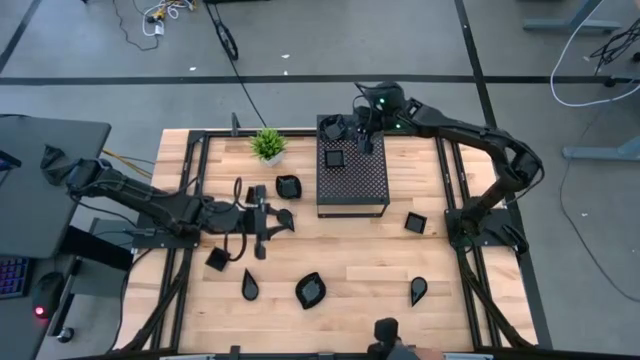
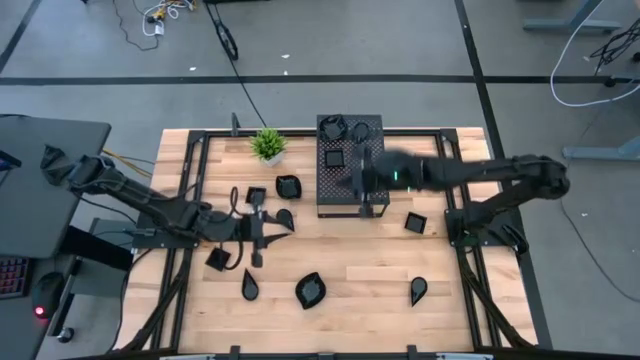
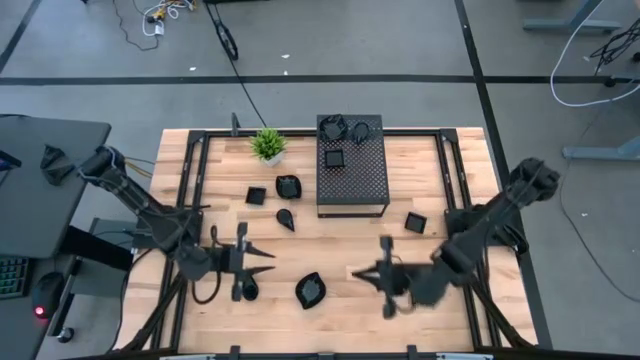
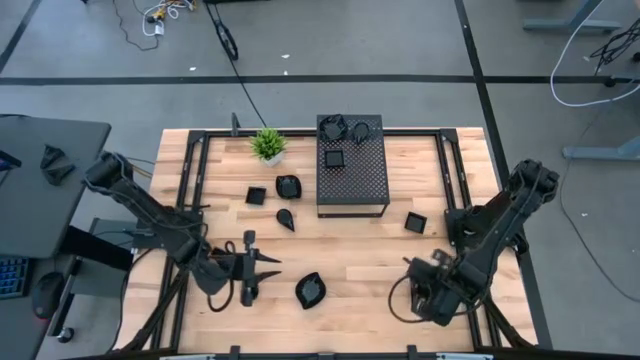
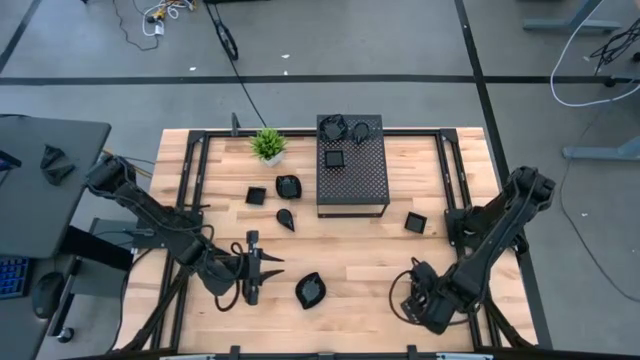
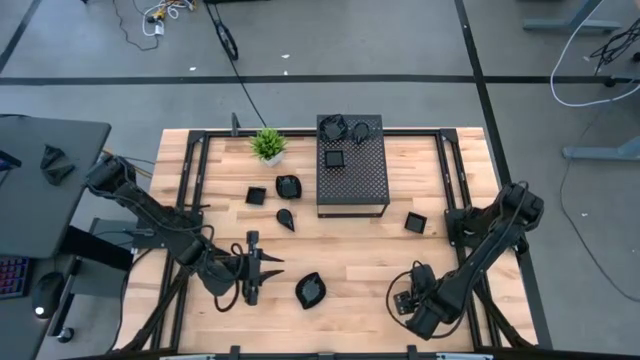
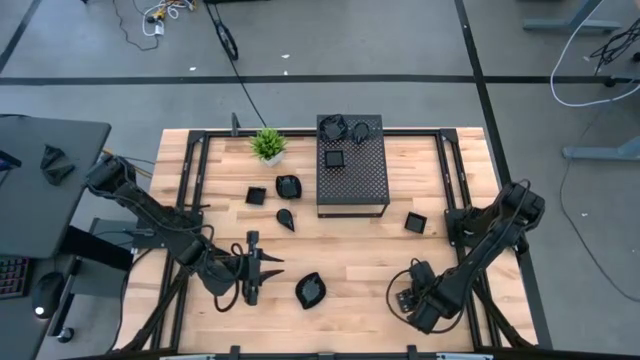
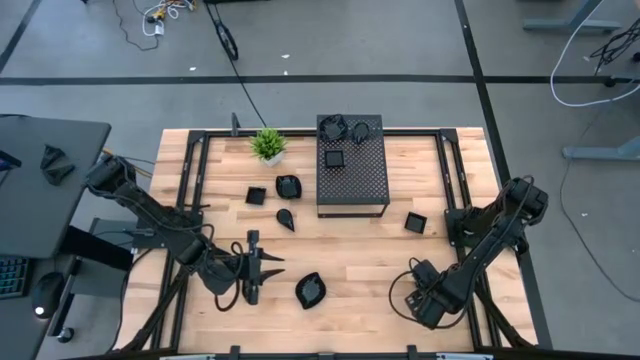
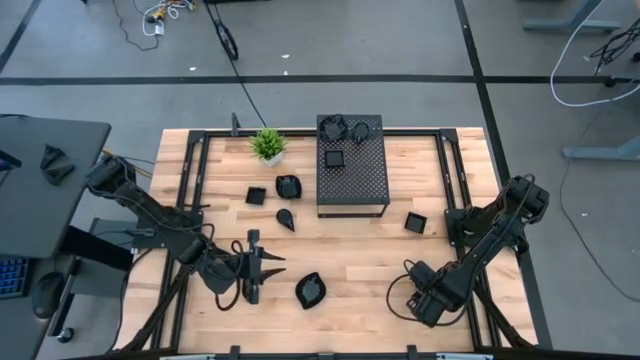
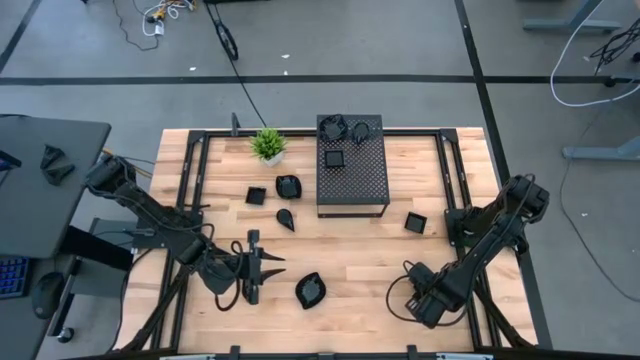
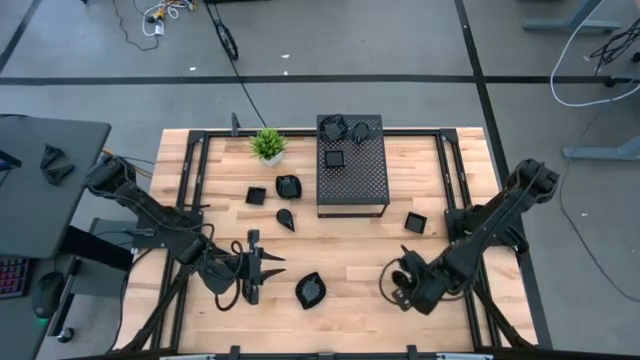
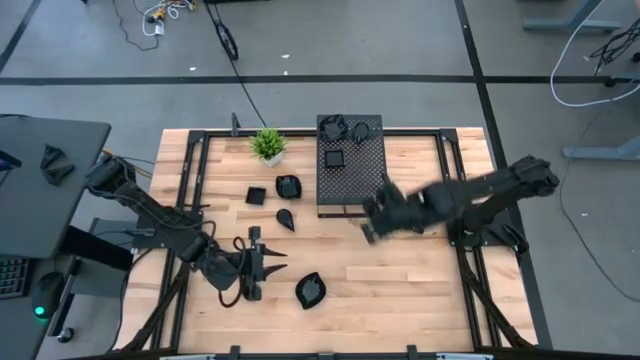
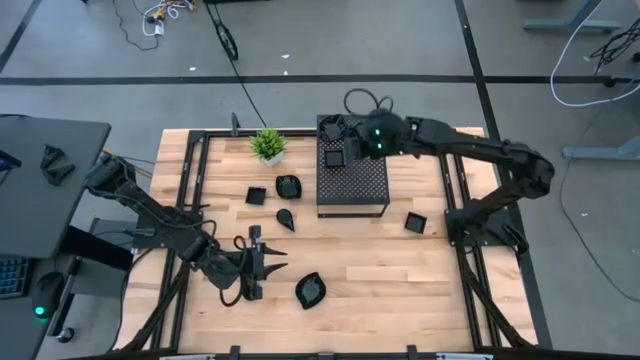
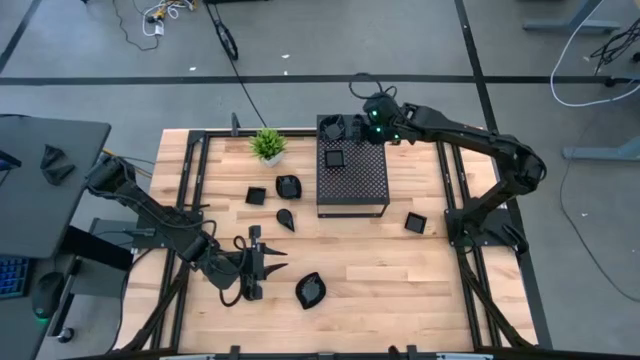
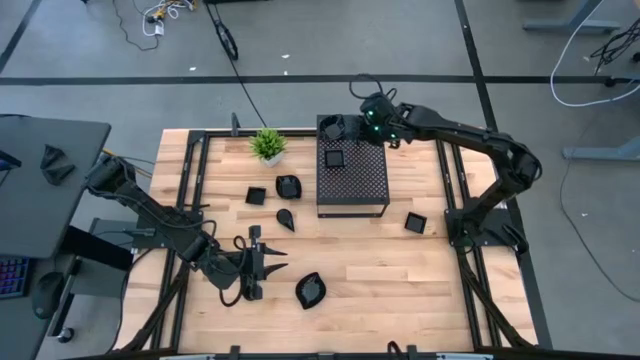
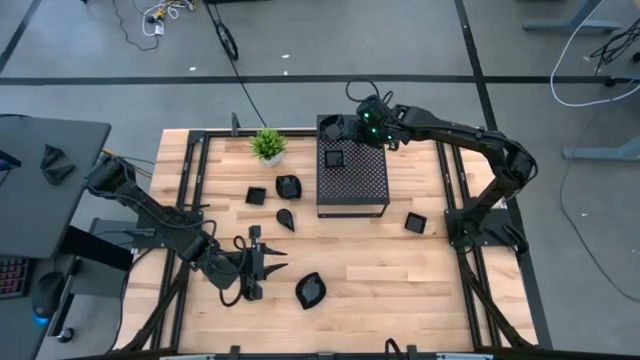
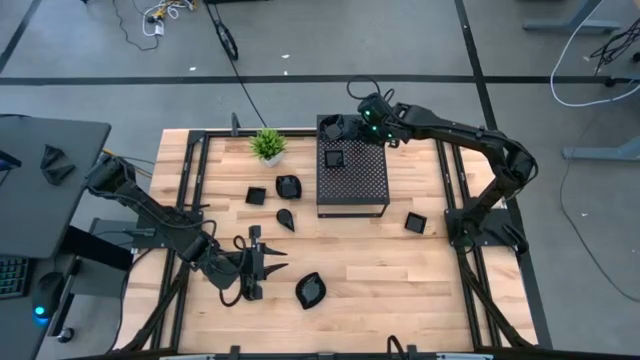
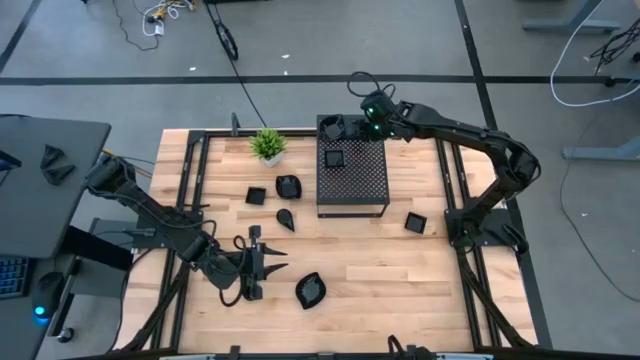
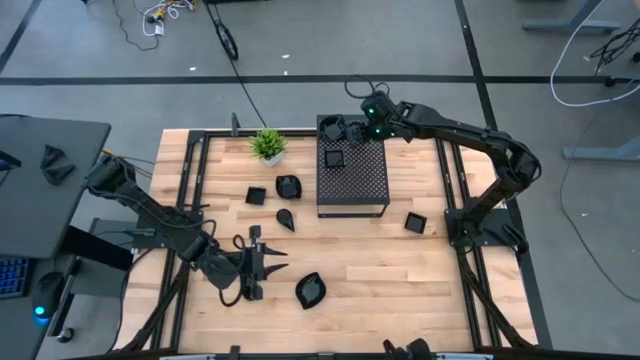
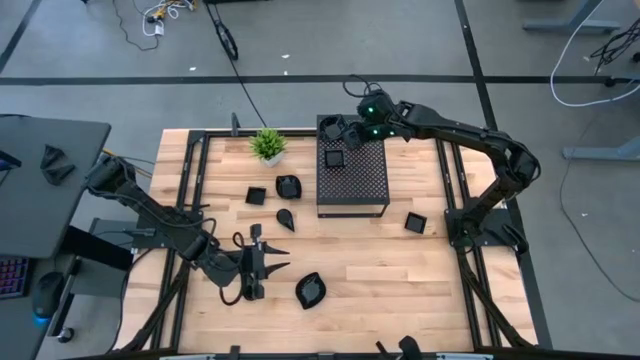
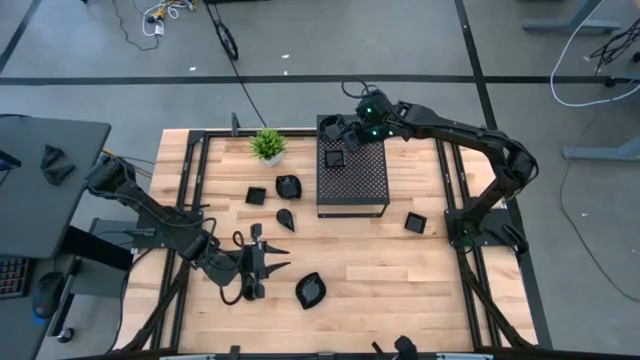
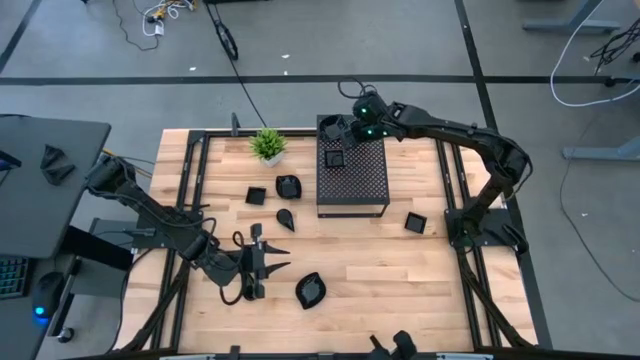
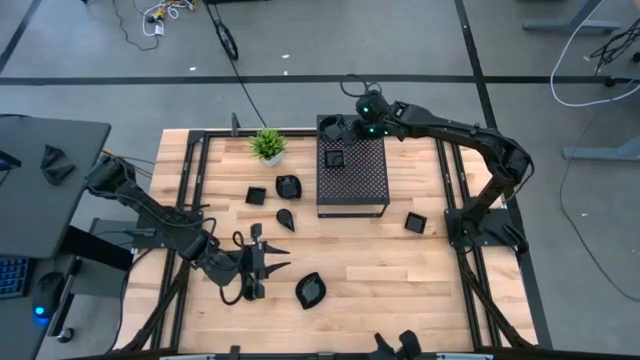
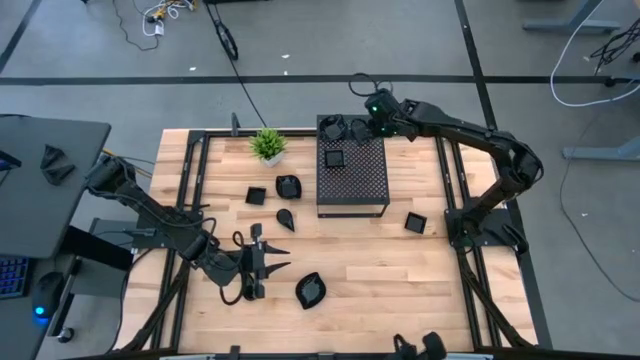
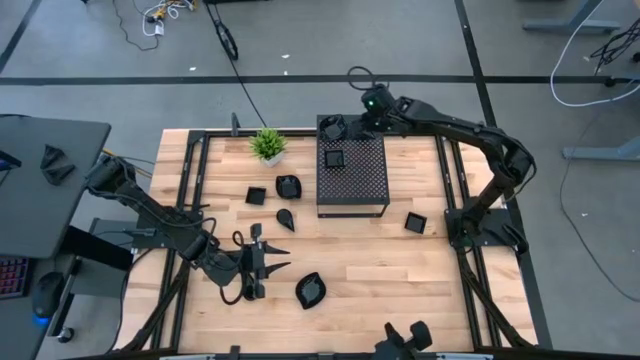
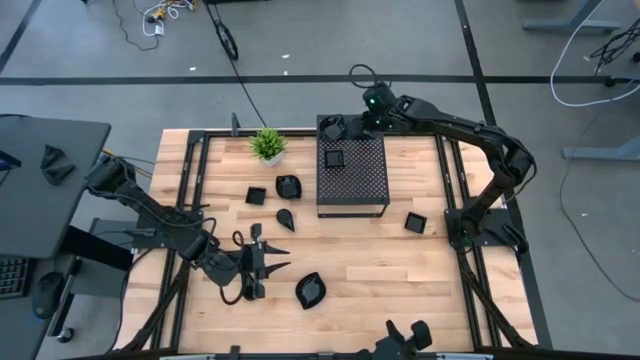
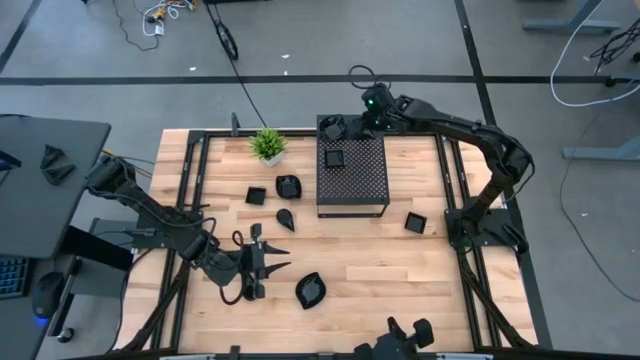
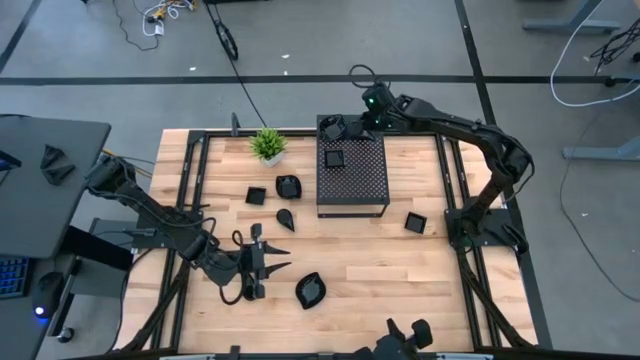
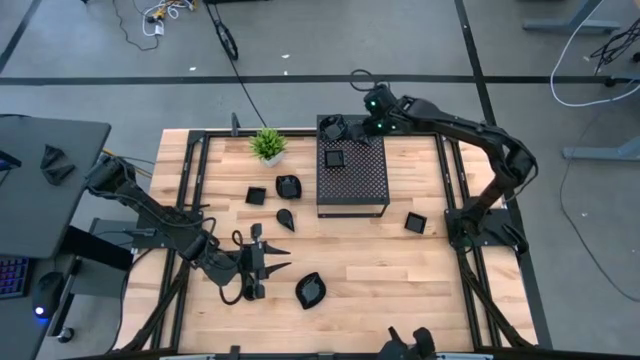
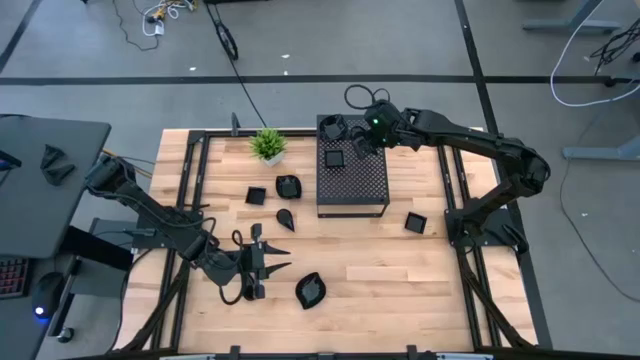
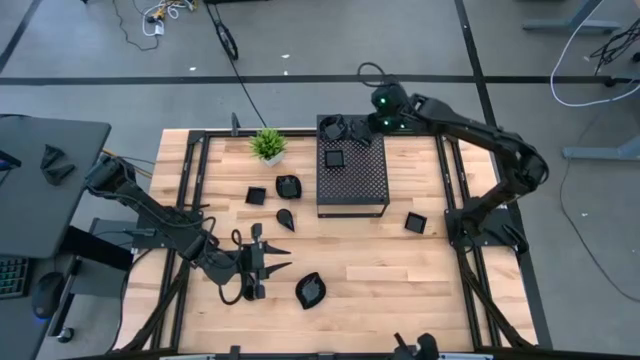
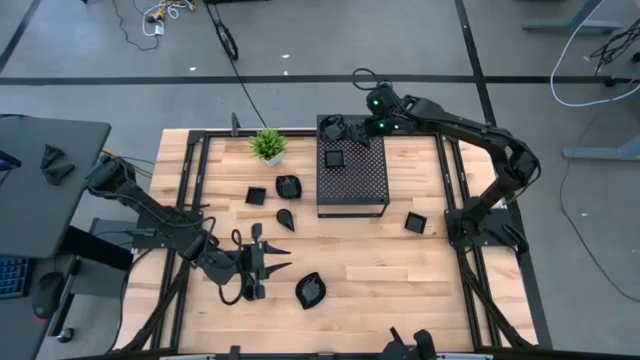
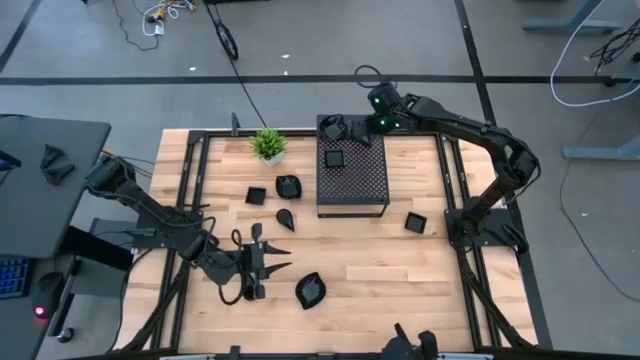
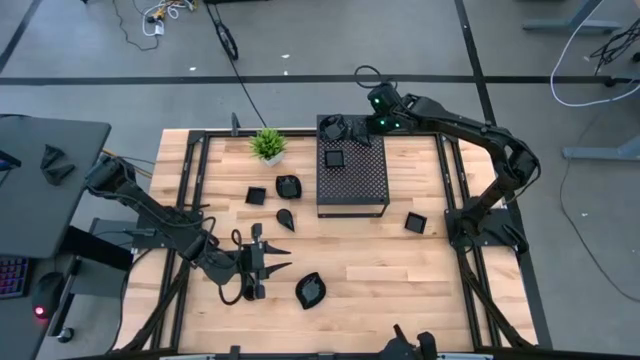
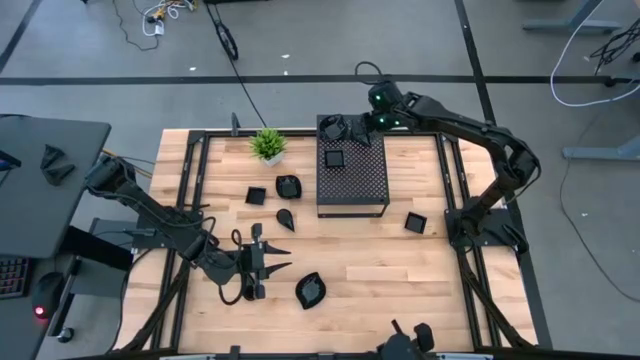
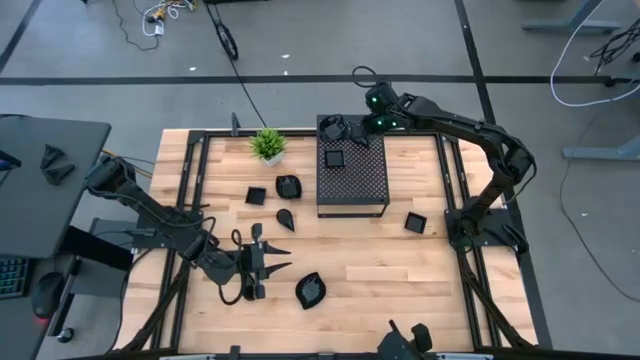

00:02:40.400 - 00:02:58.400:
Task: Pick & Place Mini shaped plates
Stack the bottom right drop shaped plate on top of the drop shaped plates on the shelf

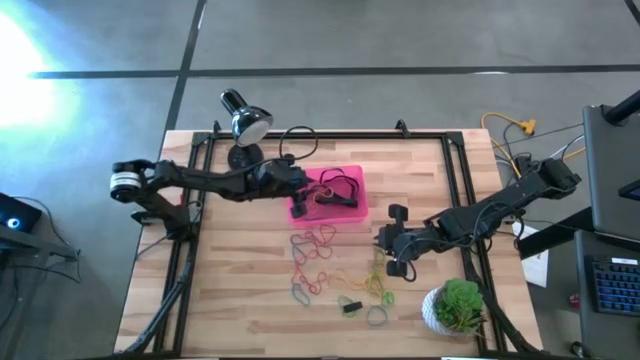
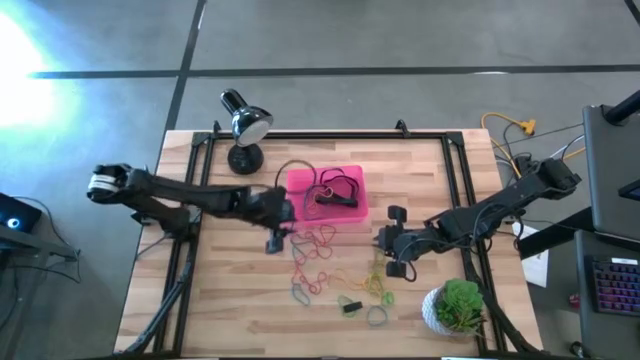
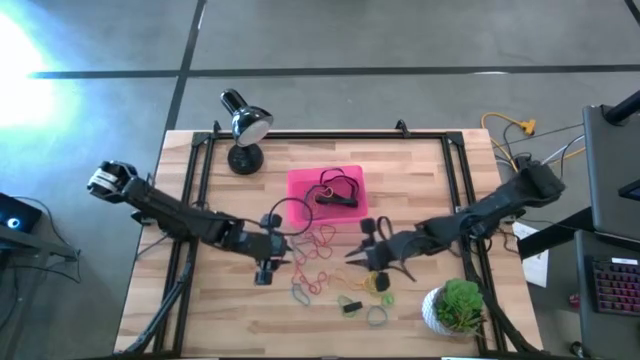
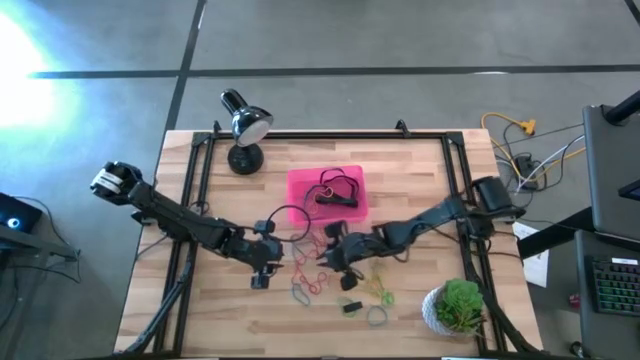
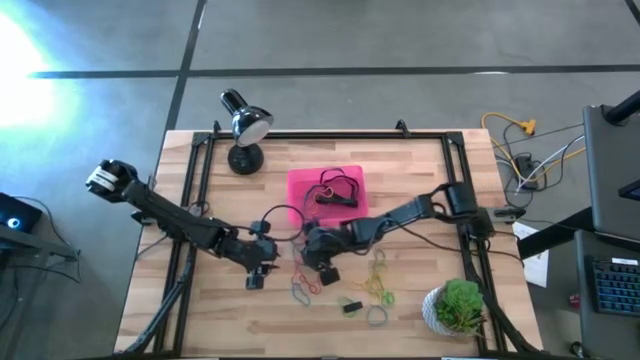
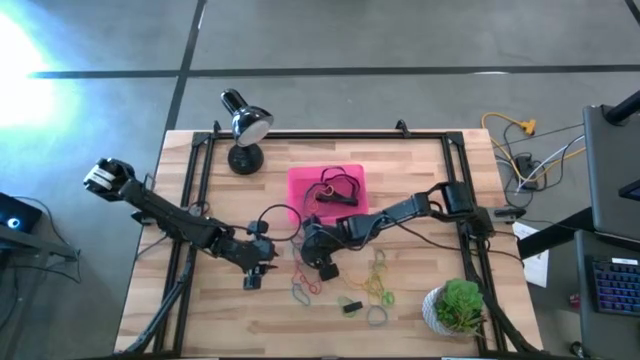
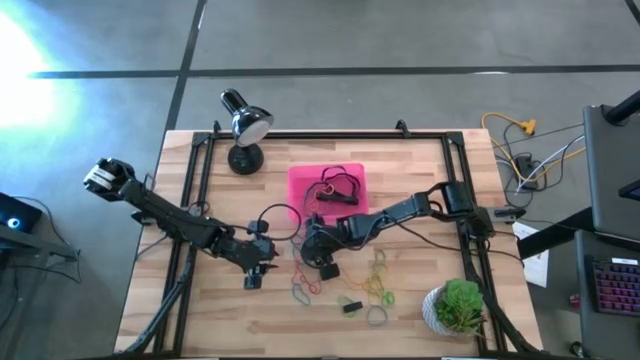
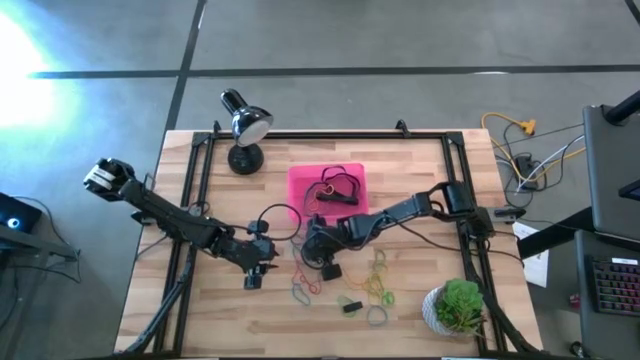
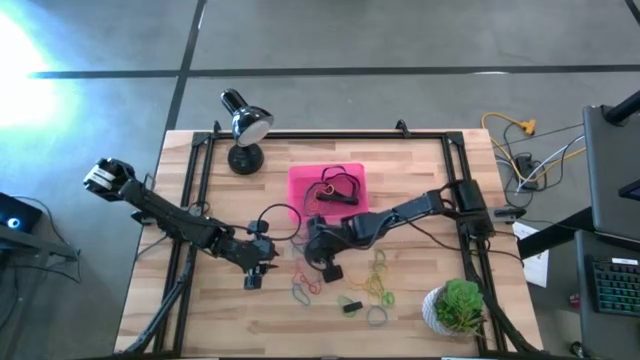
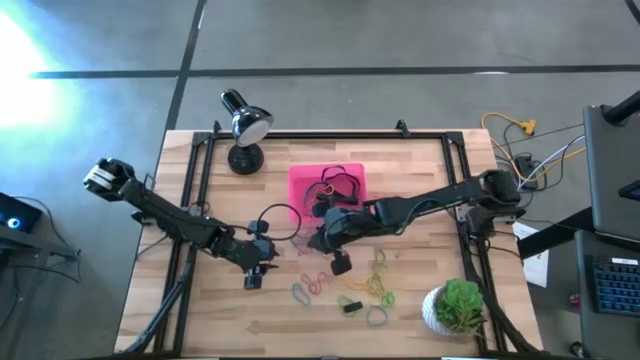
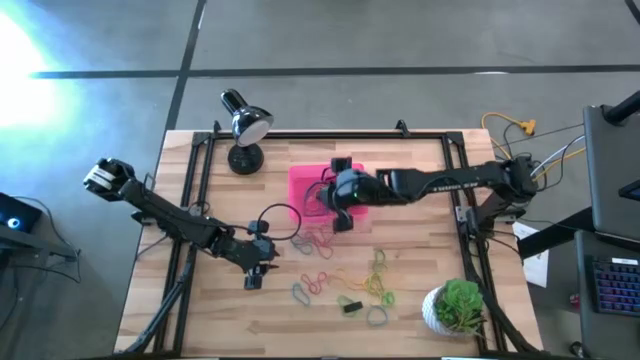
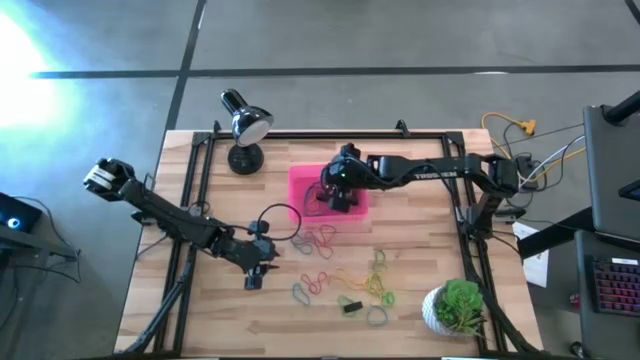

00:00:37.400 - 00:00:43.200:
Task: Pick and place rubber bands into bin
Put the red rubber band into the red bin
